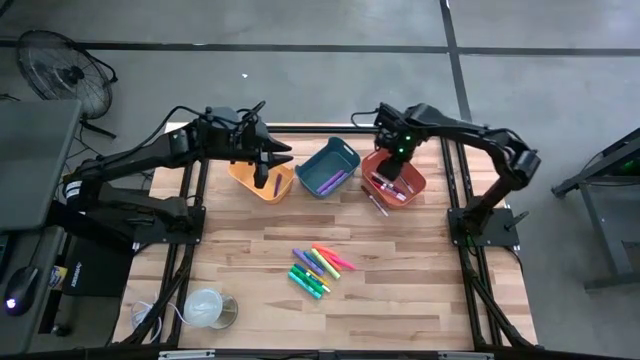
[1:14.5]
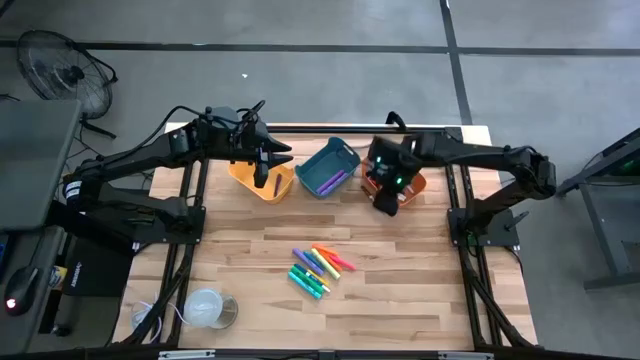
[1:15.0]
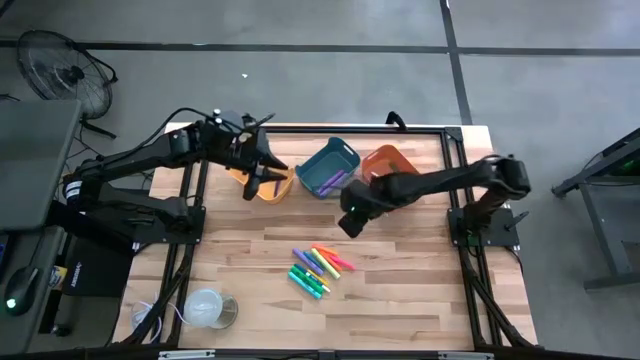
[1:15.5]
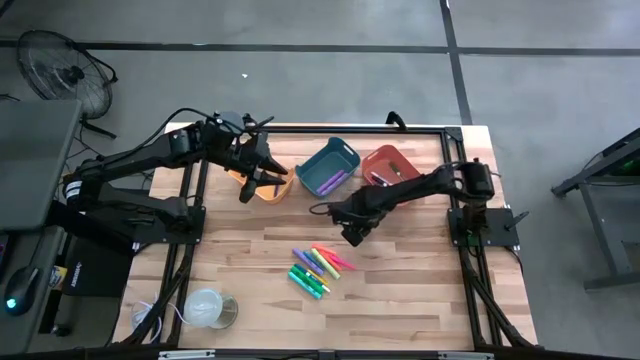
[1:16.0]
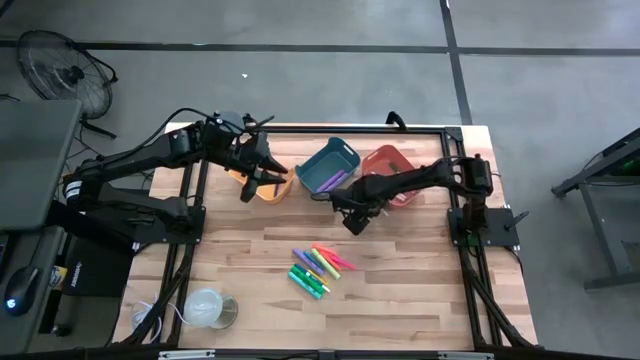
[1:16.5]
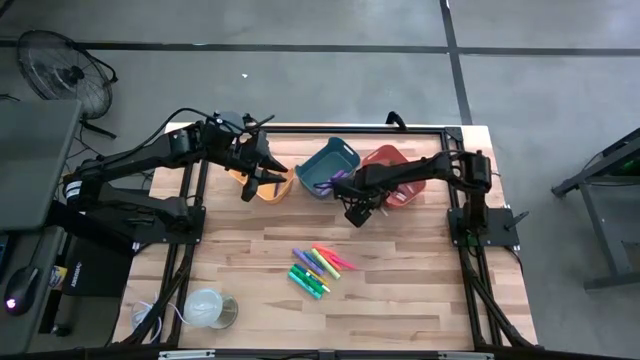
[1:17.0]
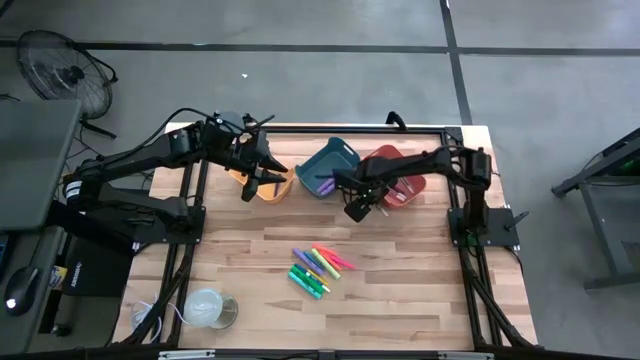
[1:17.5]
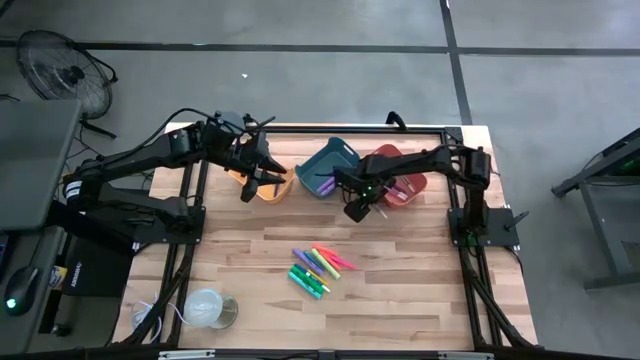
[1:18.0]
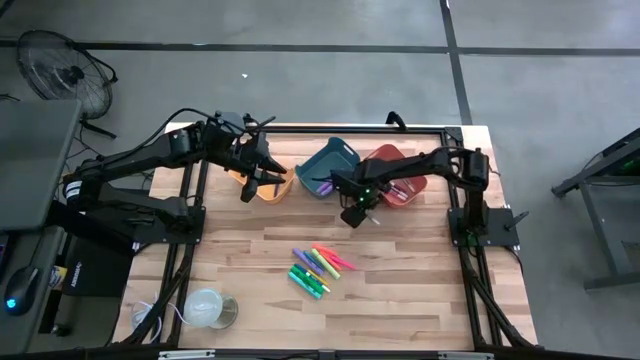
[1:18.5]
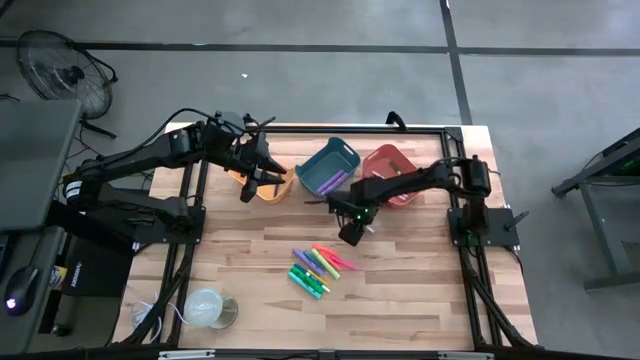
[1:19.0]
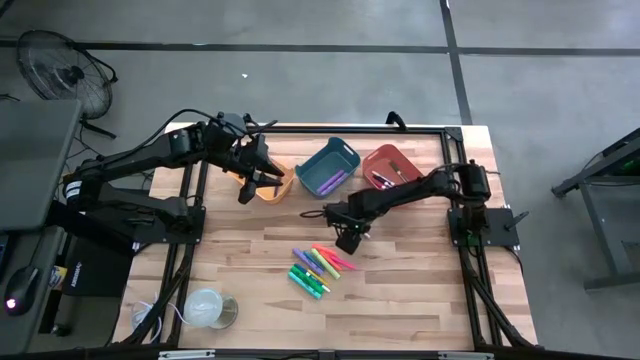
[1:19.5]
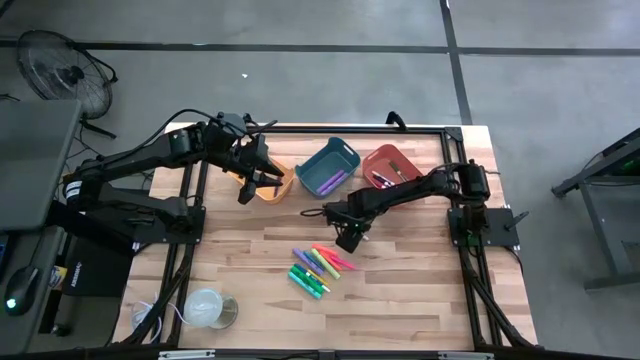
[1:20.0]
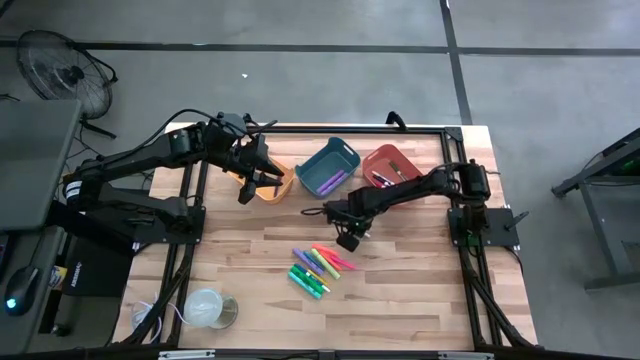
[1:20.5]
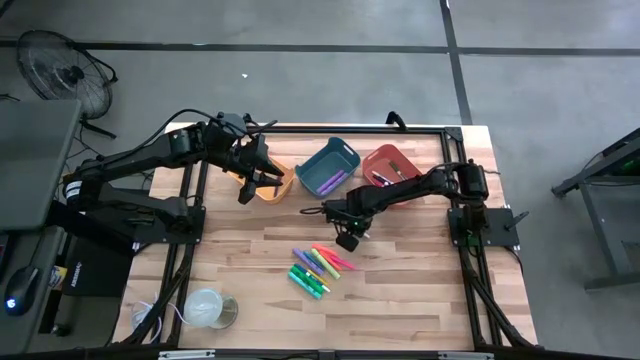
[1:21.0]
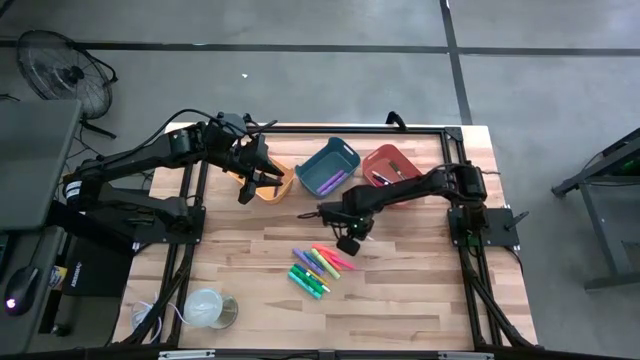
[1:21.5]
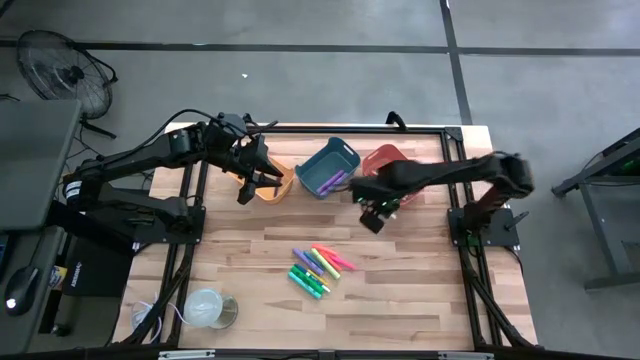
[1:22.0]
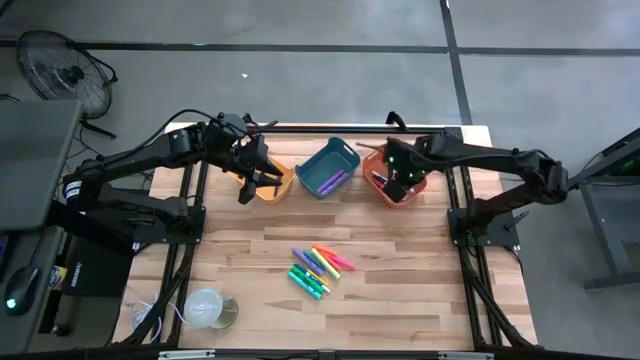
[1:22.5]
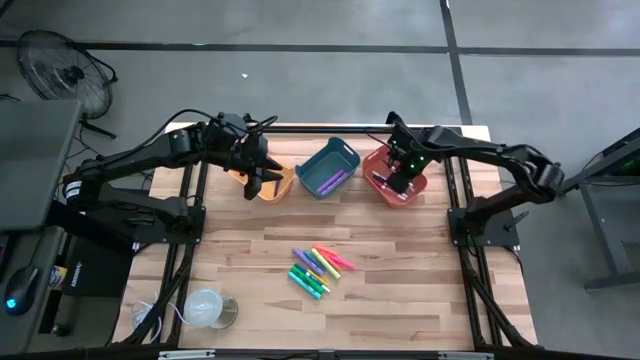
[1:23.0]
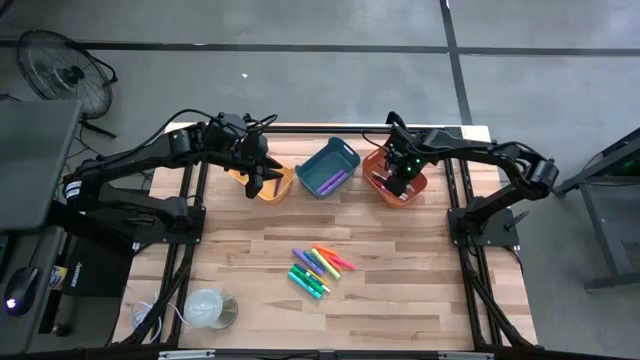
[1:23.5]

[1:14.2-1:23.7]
Task: Pick & Place Markers
Put the brown marker pen into the orange bin

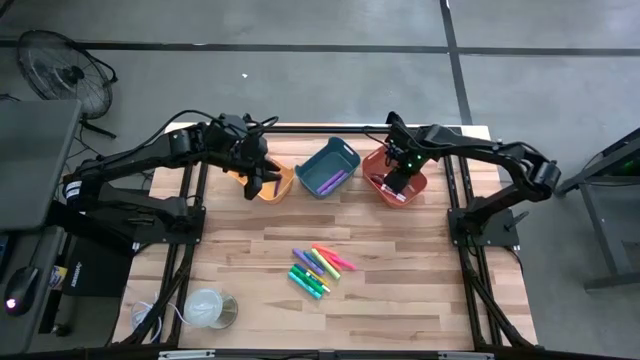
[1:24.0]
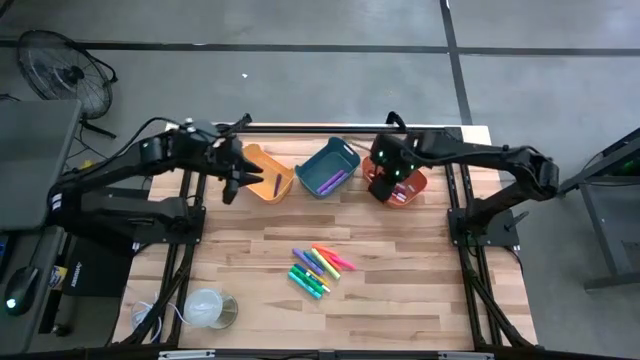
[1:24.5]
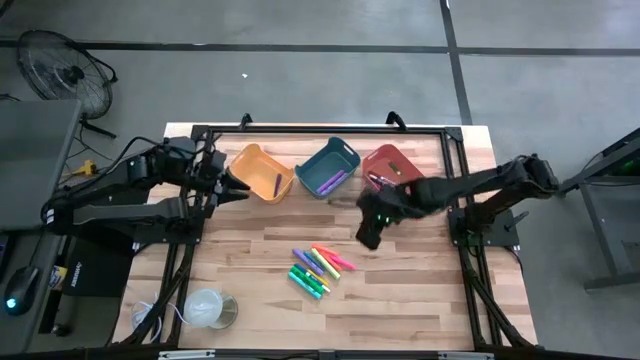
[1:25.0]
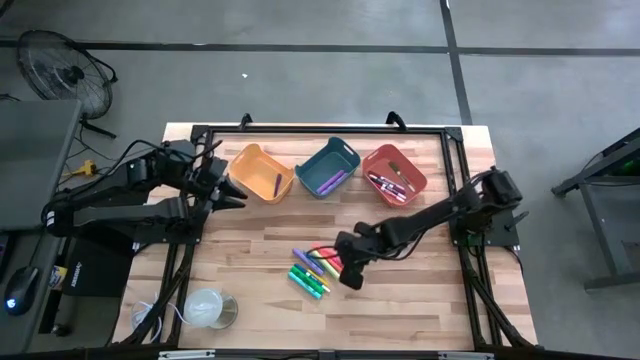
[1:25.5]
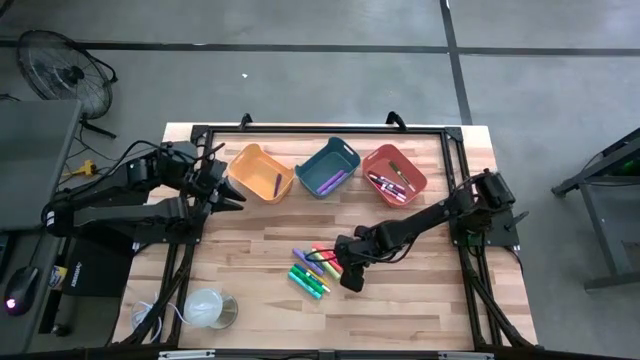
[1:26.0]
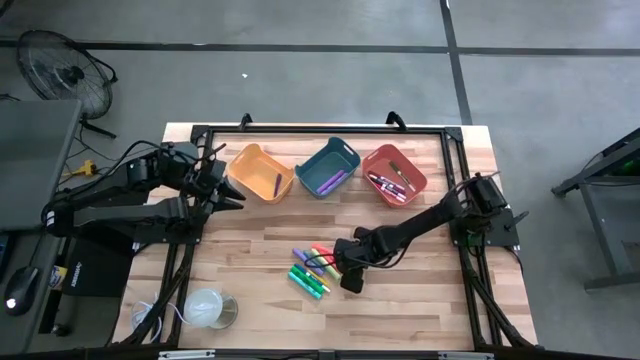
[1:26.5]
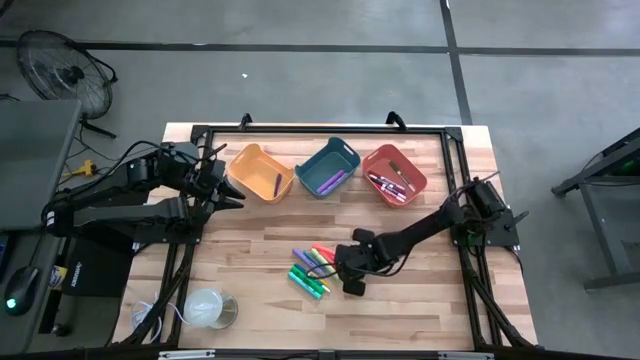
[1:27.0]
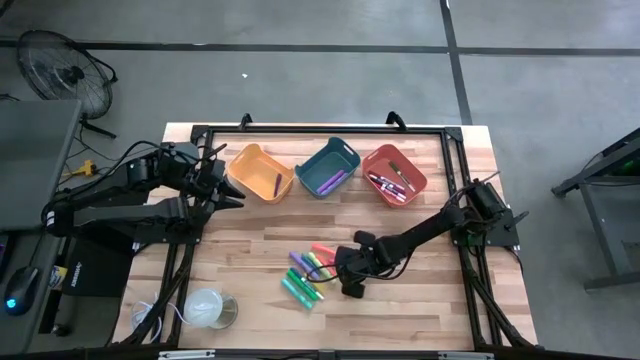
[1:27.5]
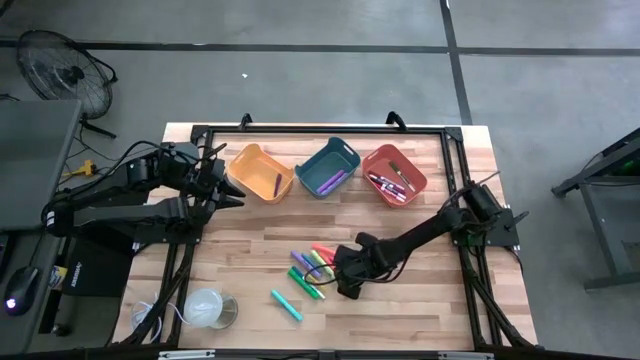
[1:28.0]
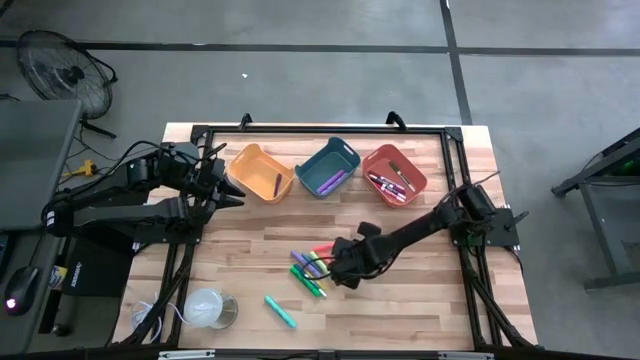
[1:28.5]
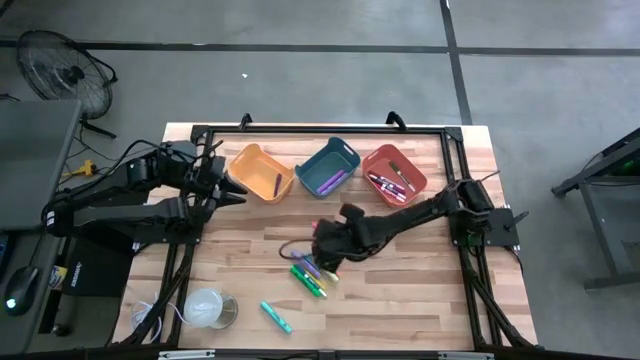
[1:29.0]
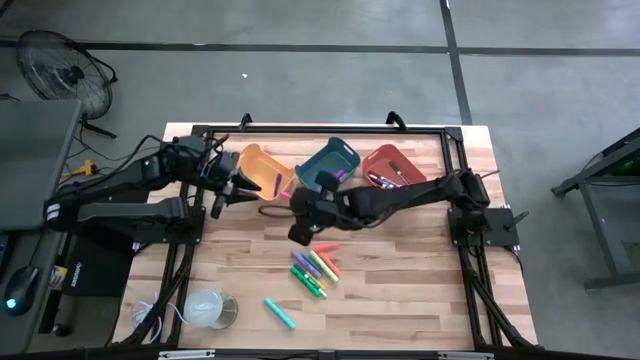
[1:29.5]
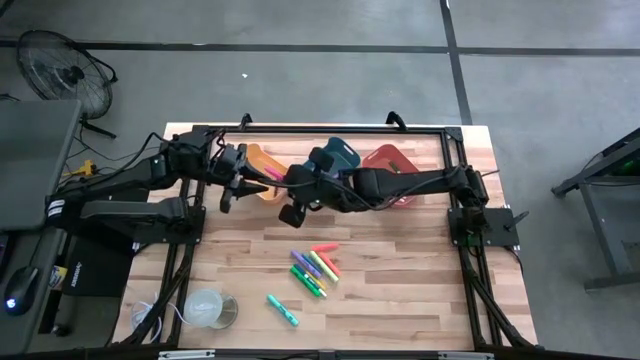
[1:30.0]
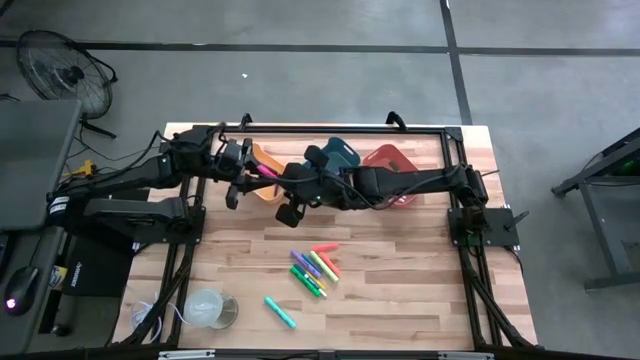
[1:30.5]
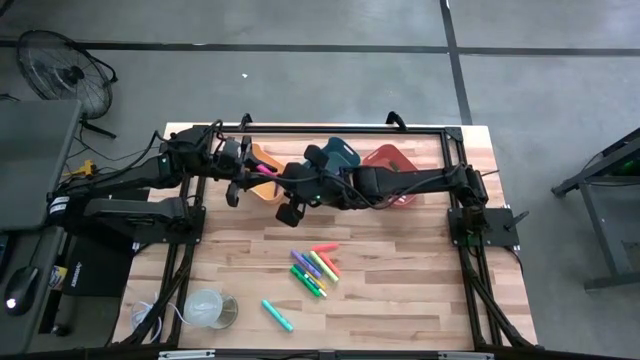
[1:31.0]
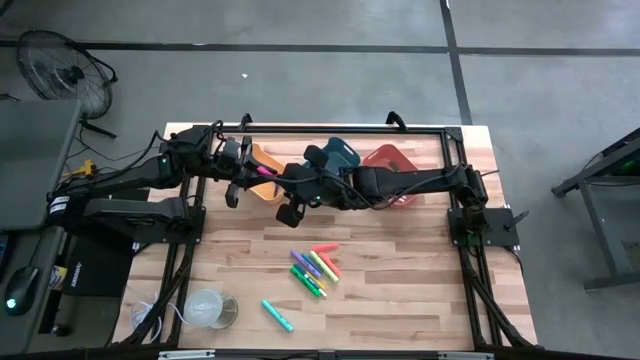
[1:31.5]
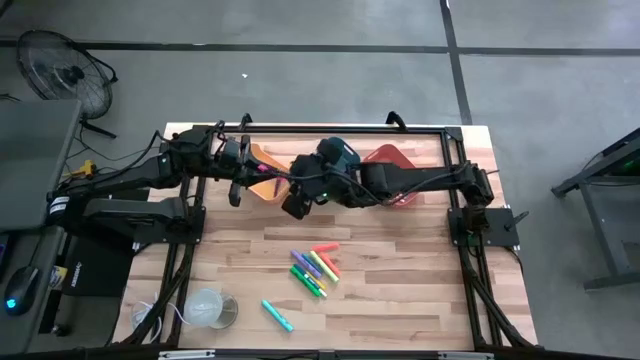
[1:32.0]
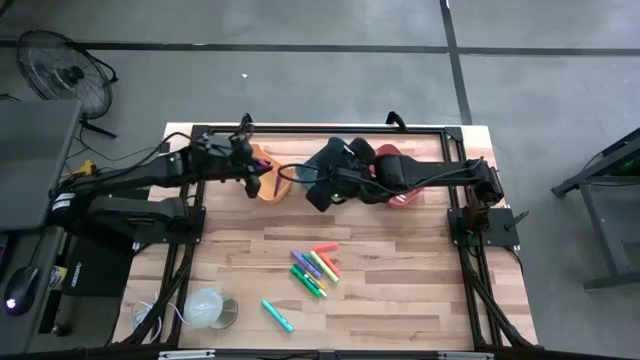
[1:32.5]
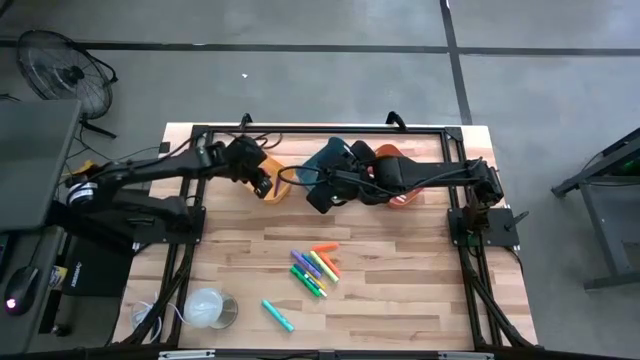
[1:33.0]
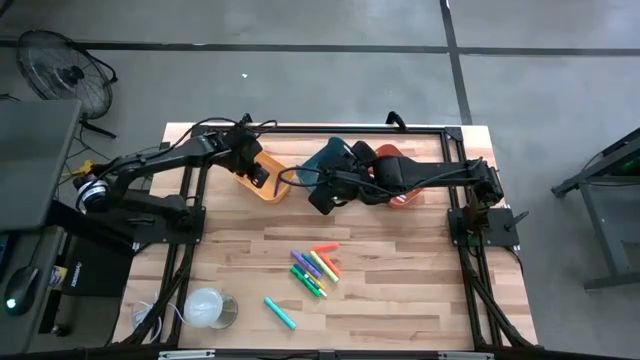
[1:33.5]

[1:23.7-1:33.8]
Put the pink pen into the yellow bin
